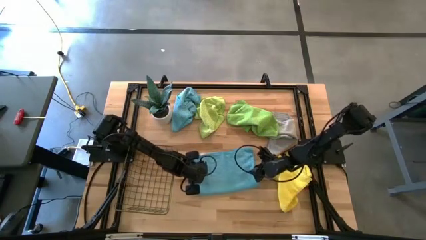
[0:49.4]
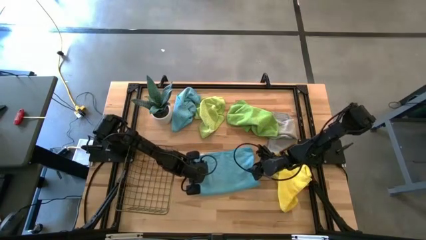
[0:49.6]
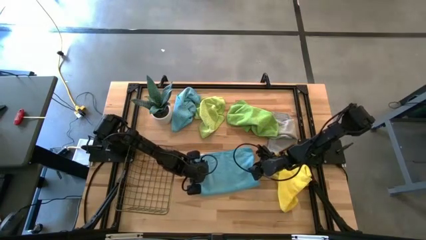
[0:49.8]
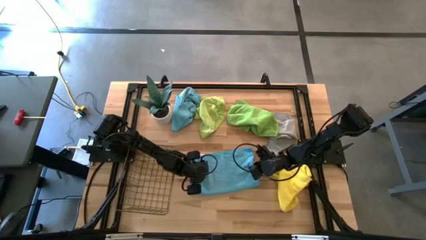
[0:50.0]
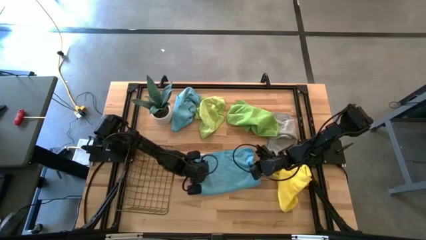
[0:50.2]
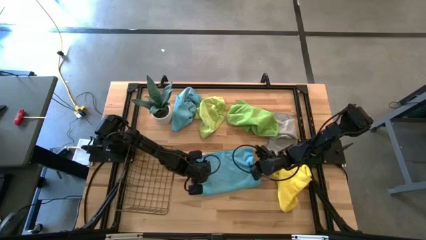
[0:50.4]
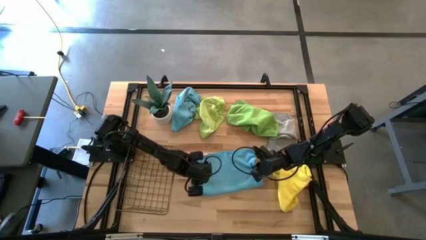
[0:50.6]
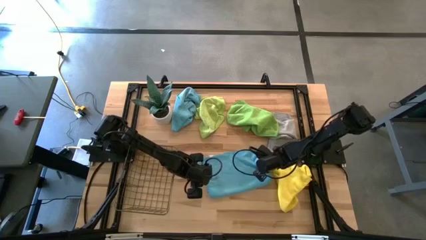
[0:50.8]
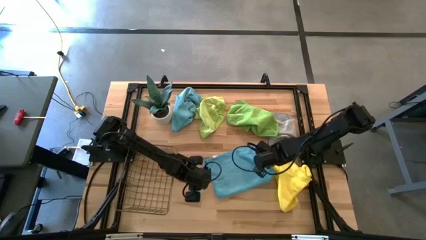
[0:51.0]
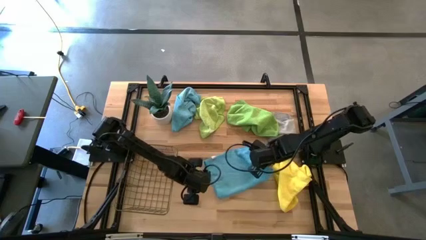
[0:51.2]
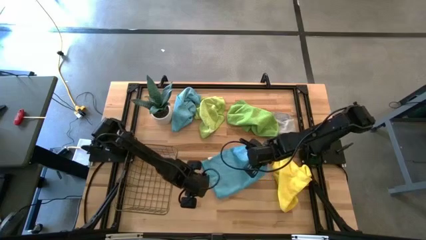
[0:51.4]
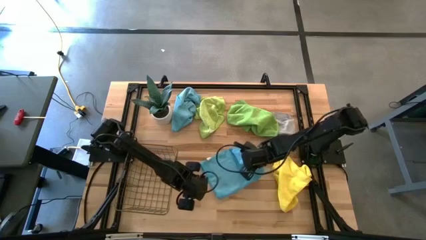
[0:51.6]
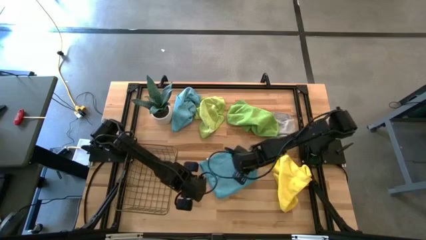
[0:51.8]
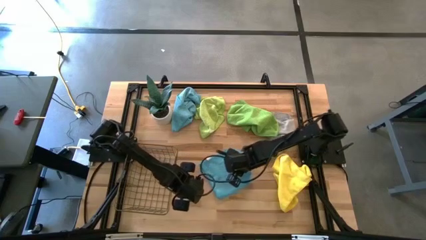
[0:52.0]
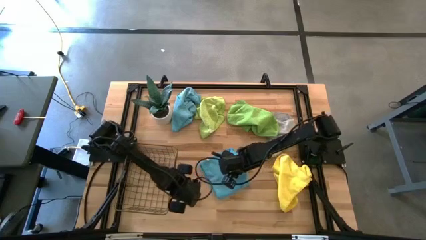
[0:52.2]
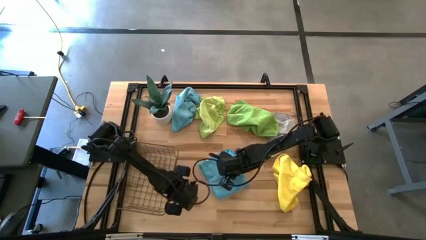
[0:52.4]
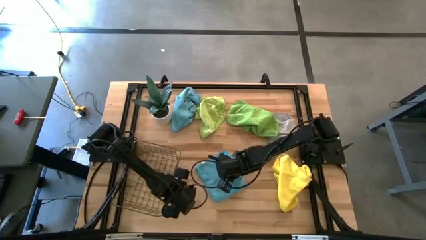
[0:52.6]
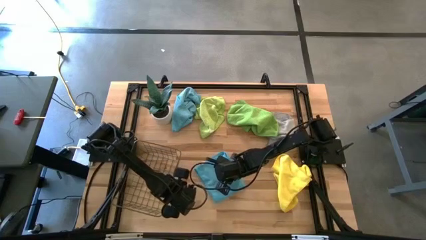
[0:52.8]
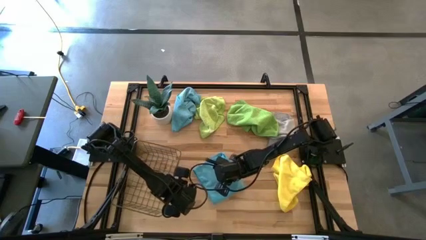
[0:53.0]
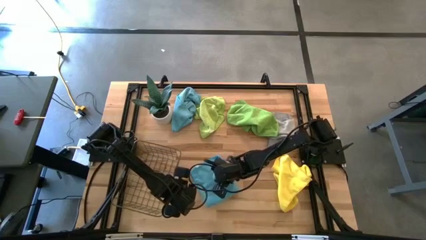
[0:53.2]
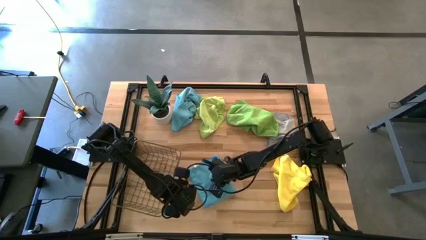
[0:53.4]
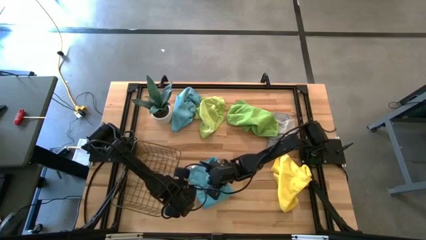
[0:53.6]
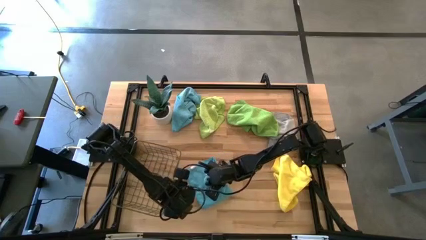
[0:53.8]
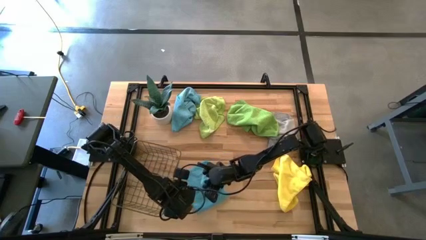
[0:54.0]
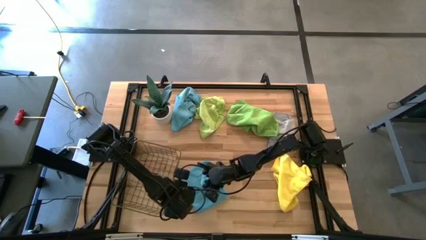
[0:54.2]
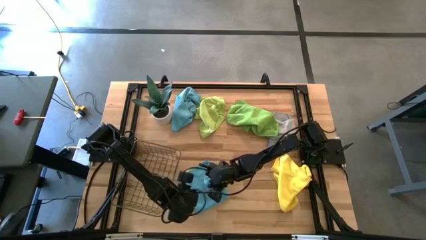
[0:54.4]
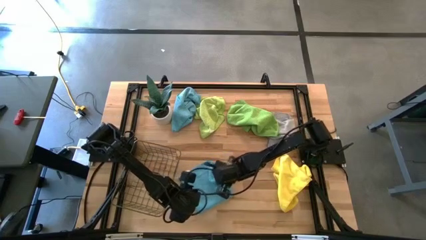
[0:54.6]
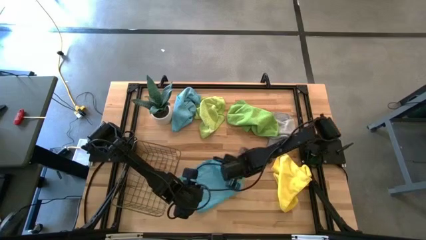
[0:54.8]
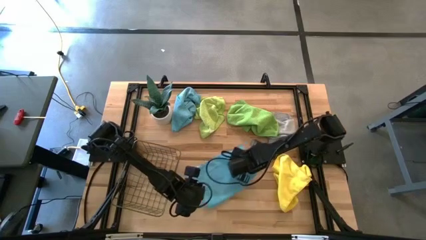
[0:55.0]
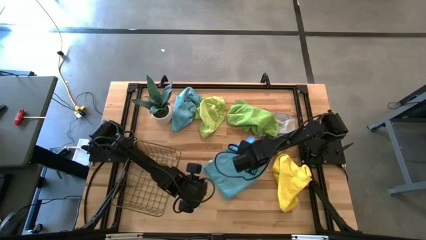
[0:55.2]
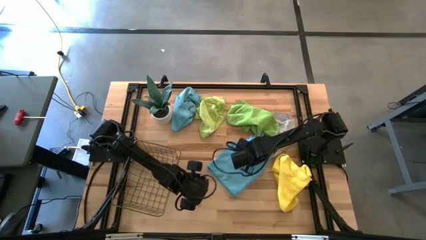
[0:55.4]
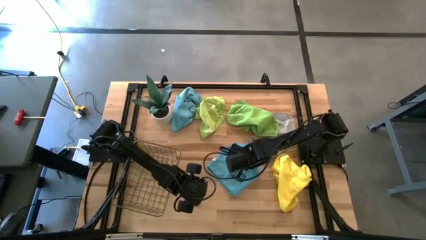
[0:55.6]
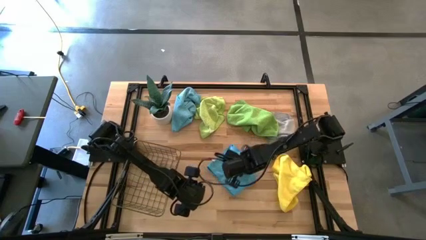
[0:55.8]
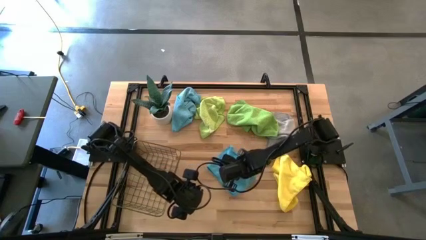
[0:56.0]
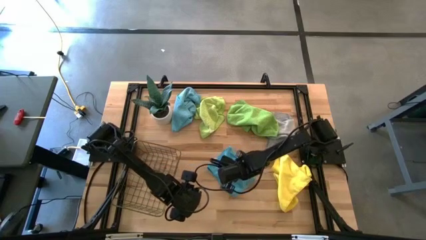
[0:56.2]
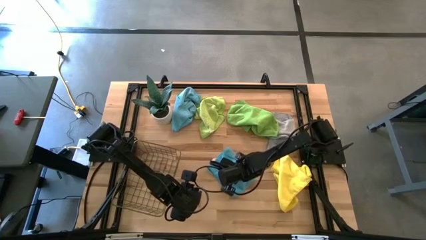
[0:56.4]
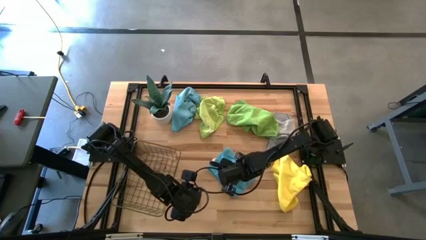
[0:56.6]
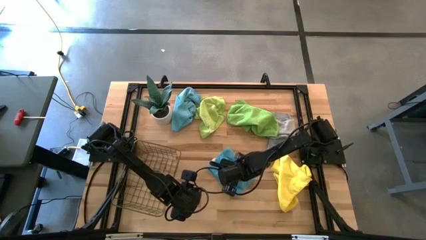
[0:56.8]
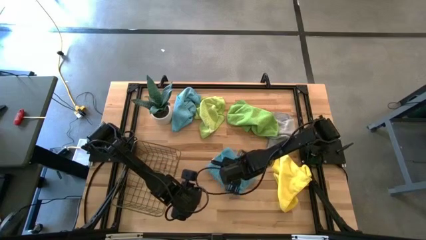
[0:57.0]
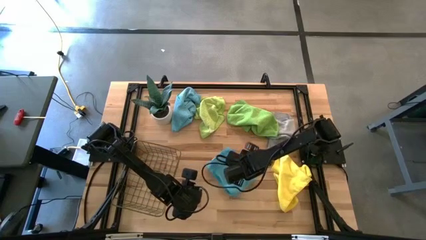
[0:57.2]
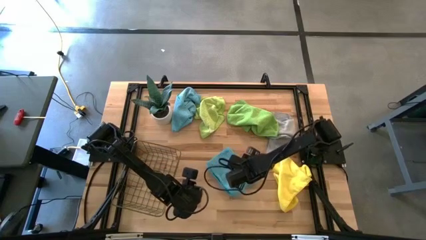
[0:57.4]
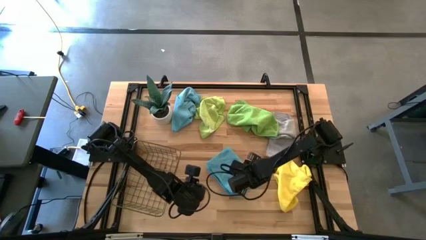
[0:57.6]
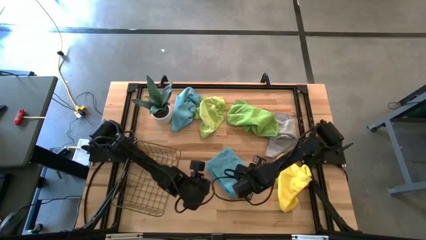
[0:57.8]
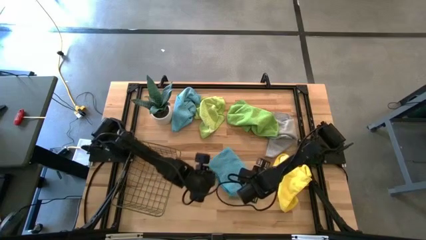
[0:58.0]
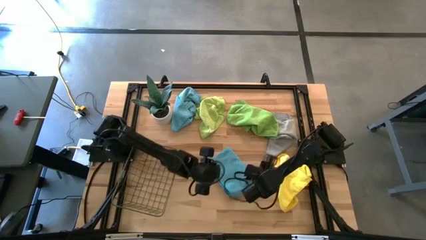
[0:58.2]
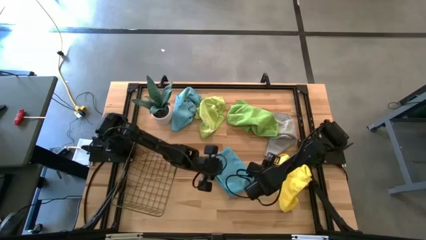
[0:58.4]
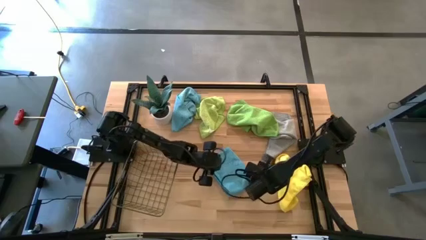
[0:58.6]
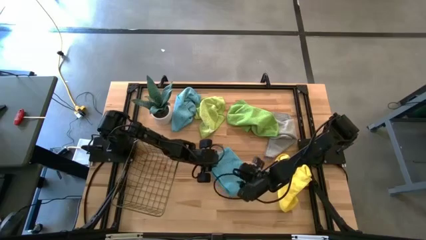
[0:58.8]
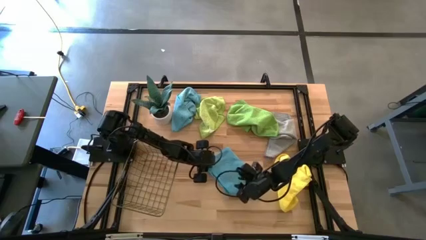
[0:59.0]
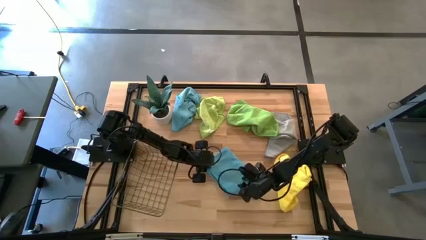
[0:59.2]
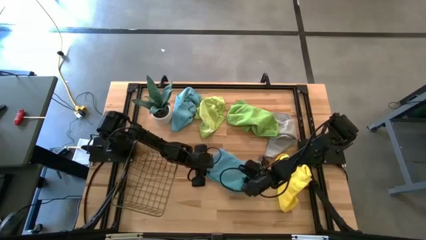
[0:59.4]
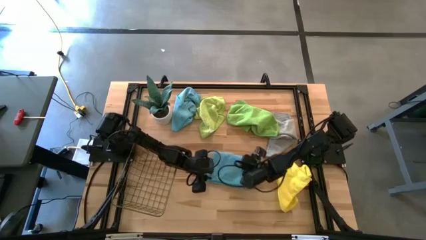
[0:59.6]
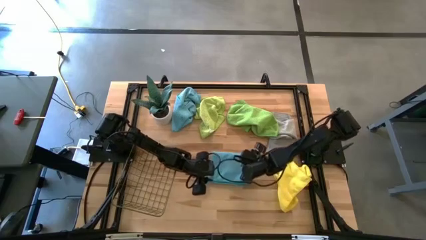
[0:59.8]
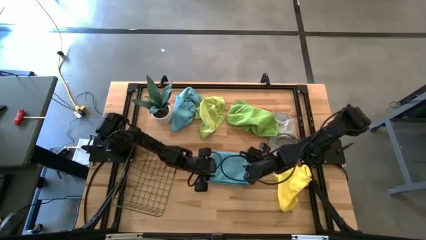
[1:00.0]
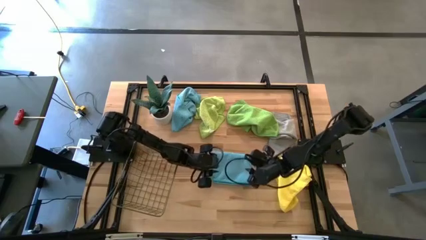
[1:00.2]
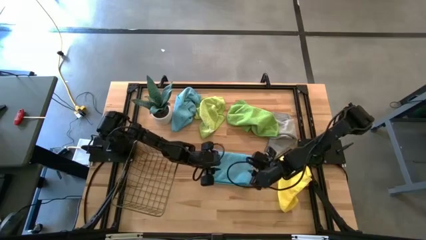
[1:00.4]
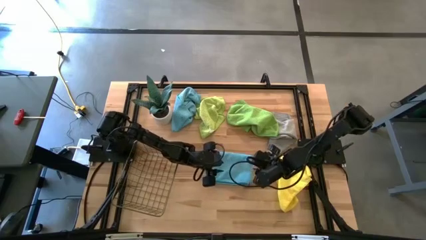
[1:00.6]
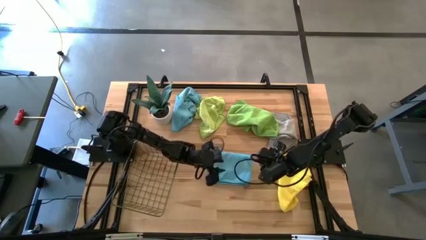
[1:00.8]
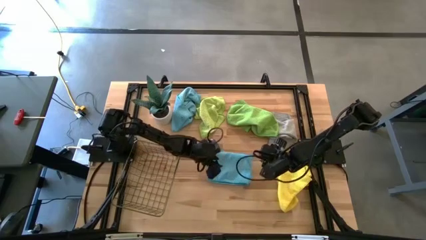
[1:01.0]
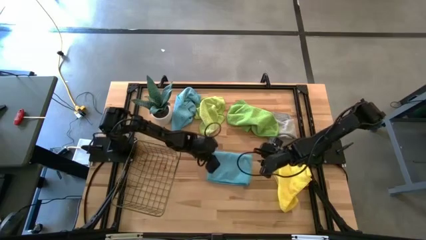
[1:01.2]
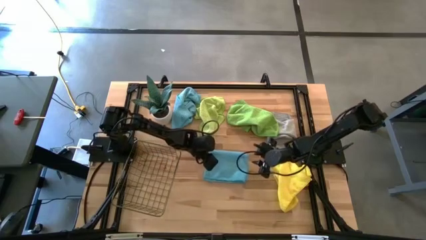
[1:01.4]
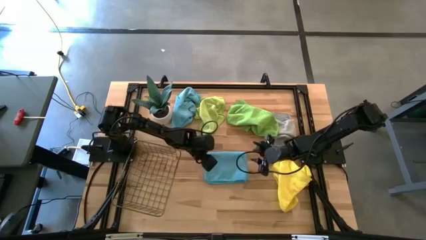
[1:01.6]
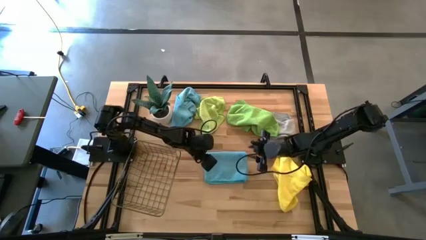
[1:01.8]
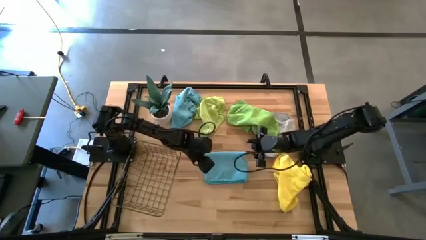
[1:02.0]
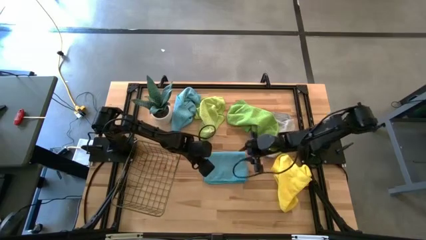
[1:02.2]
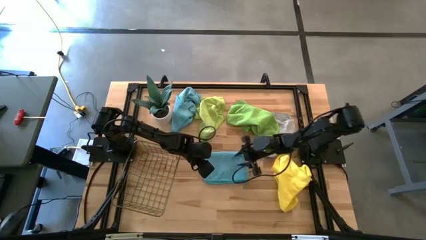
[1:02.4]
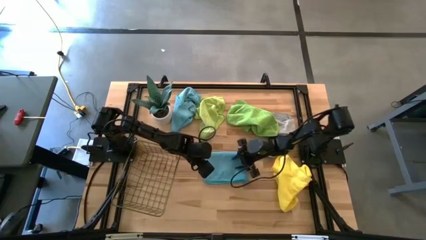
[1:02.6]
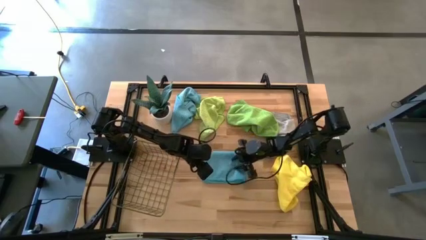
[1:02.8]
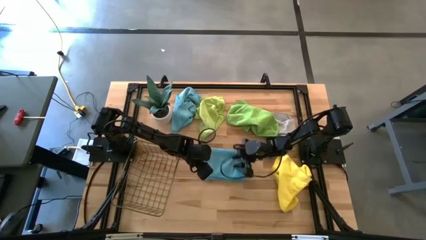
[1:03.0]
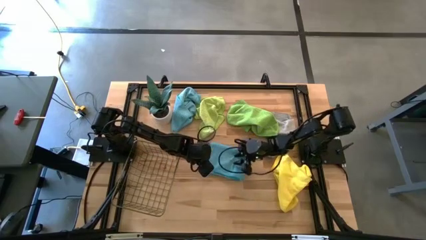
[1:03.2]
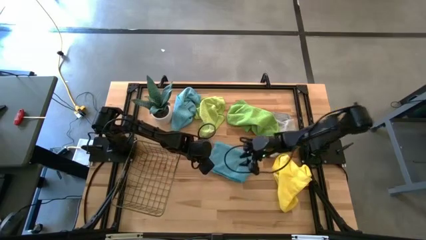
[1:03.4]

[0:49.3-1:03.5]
Task: Fold microfiber towels
Fold the bottom blue microfiber towel
